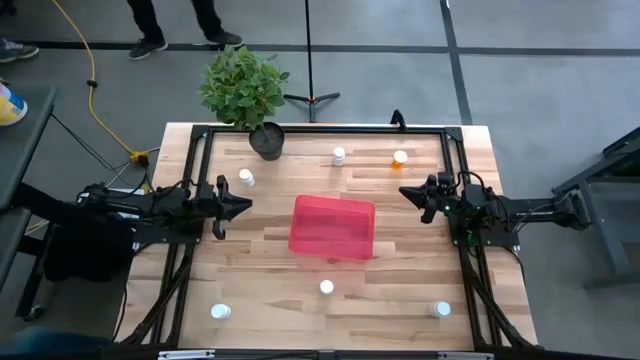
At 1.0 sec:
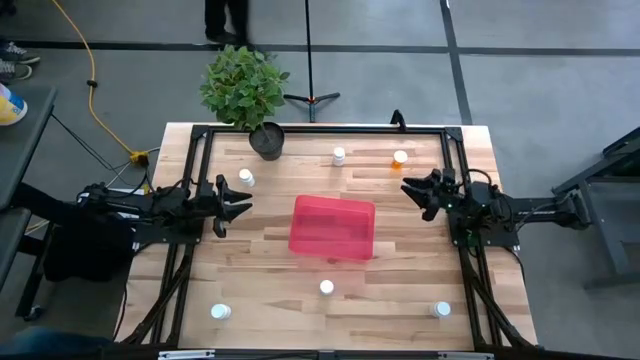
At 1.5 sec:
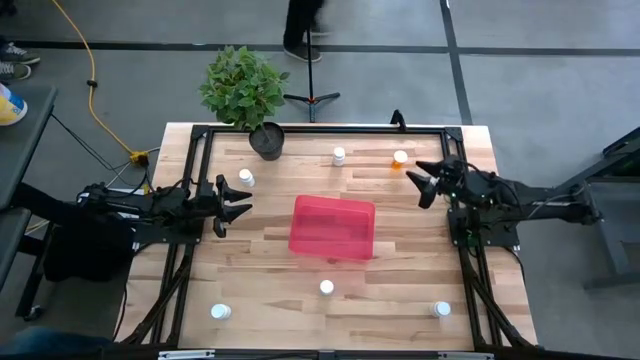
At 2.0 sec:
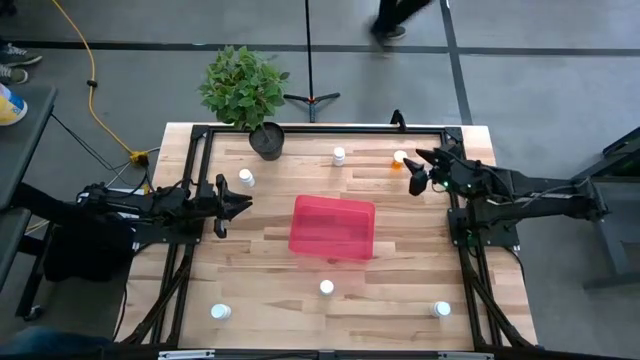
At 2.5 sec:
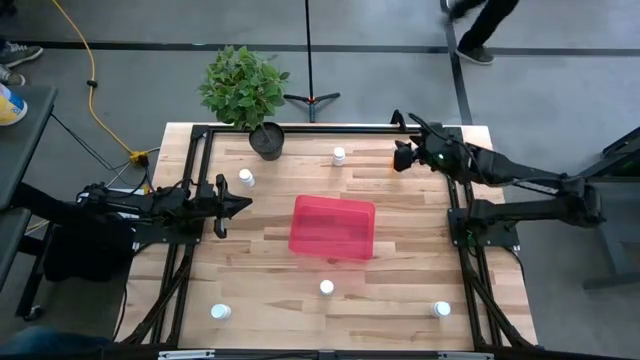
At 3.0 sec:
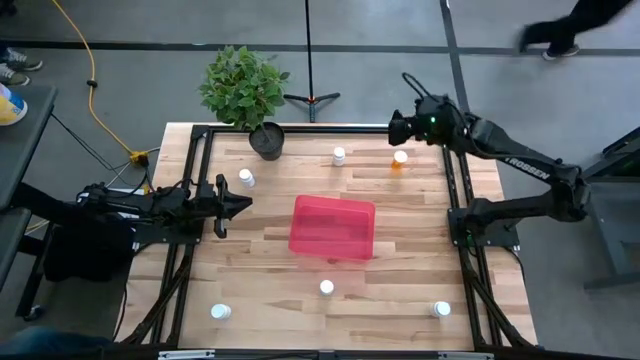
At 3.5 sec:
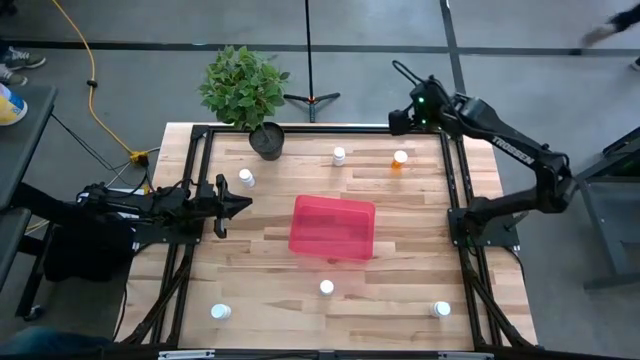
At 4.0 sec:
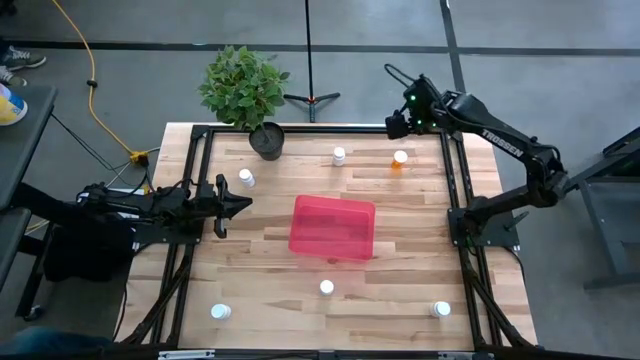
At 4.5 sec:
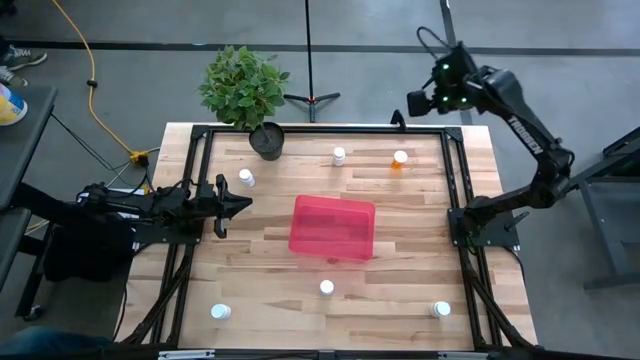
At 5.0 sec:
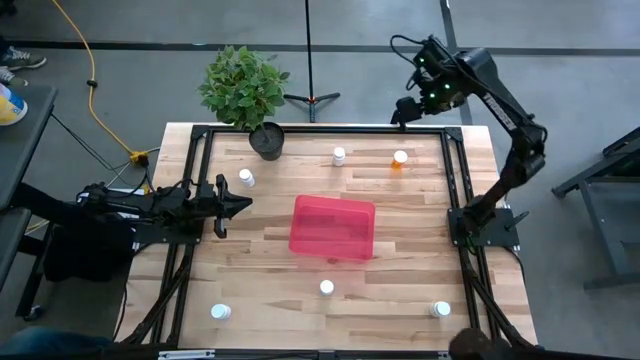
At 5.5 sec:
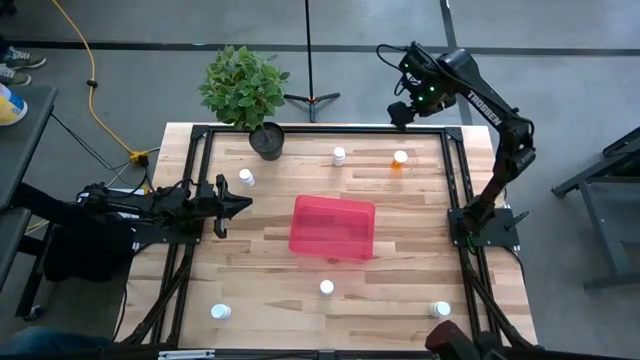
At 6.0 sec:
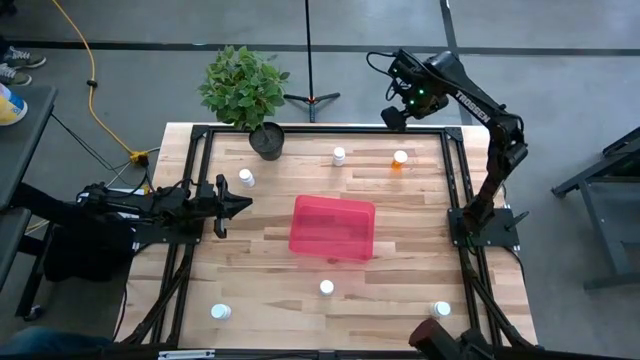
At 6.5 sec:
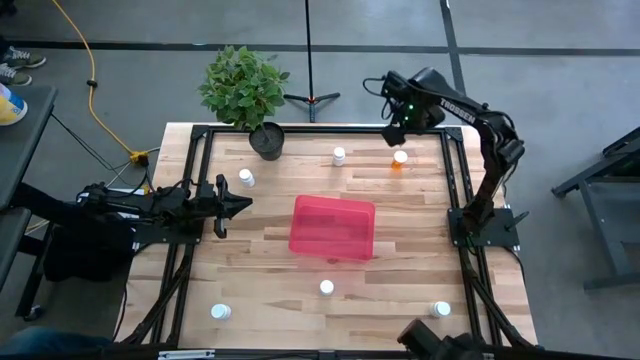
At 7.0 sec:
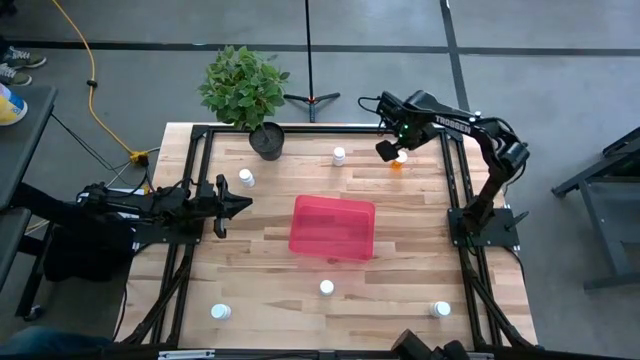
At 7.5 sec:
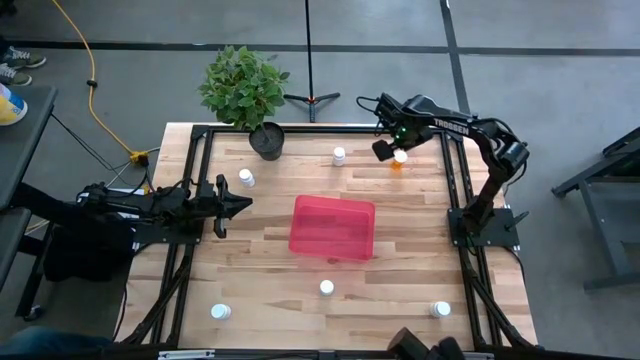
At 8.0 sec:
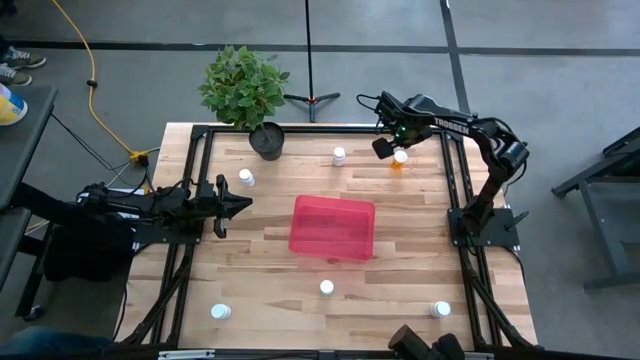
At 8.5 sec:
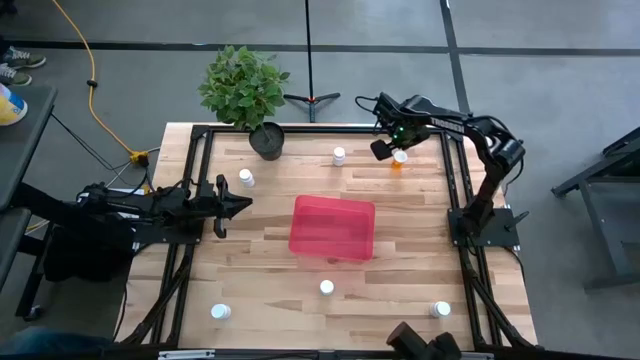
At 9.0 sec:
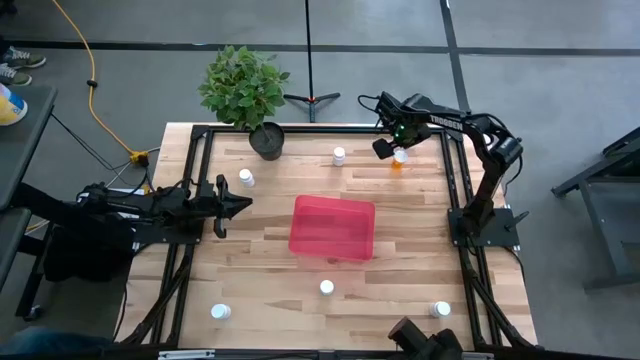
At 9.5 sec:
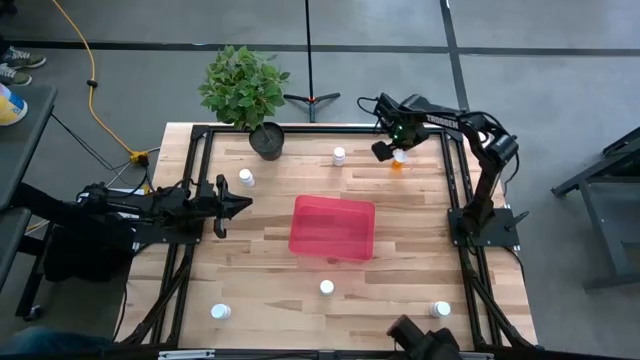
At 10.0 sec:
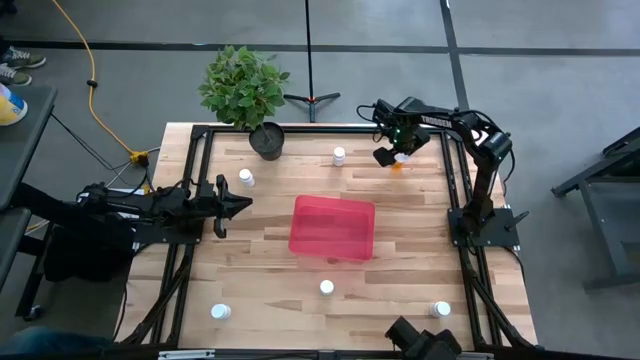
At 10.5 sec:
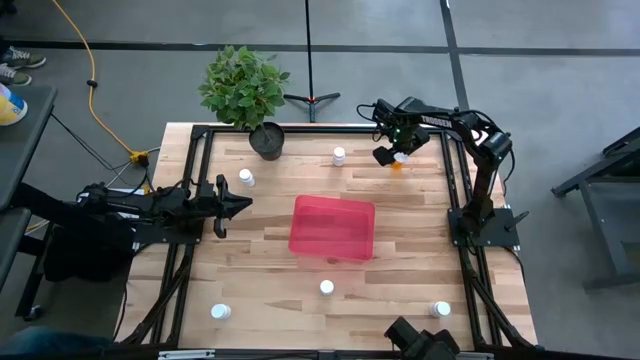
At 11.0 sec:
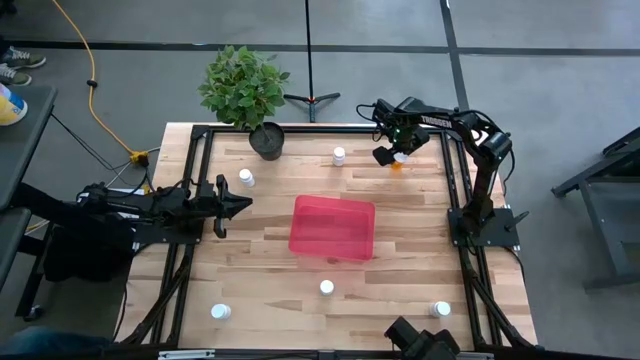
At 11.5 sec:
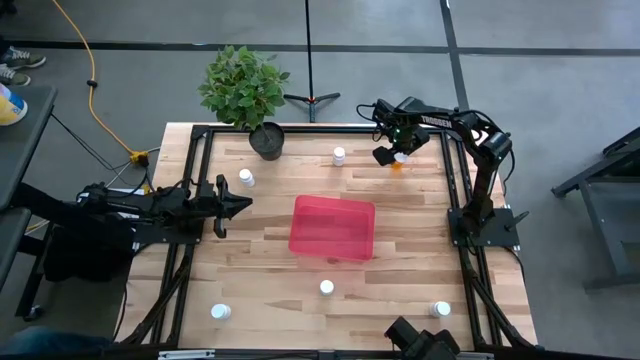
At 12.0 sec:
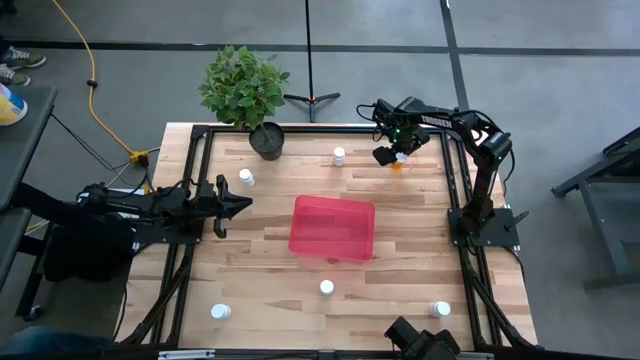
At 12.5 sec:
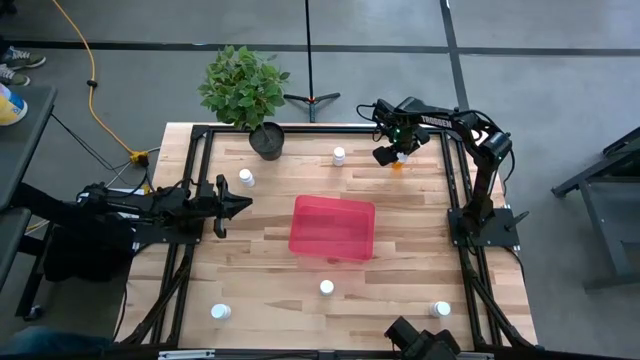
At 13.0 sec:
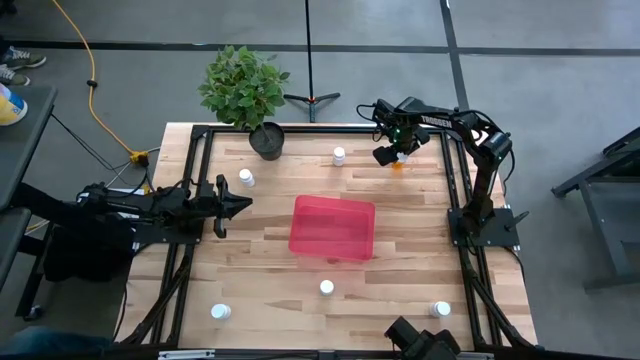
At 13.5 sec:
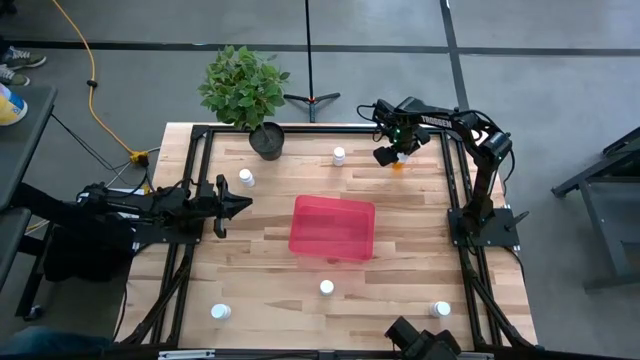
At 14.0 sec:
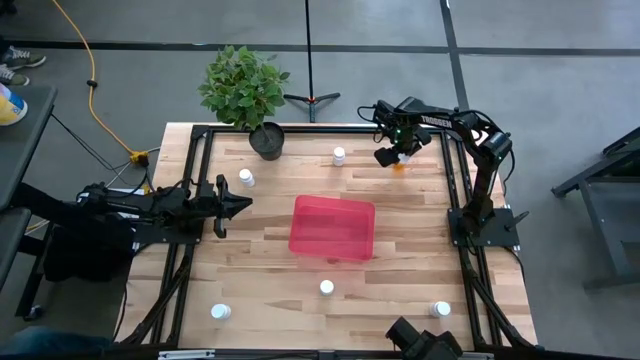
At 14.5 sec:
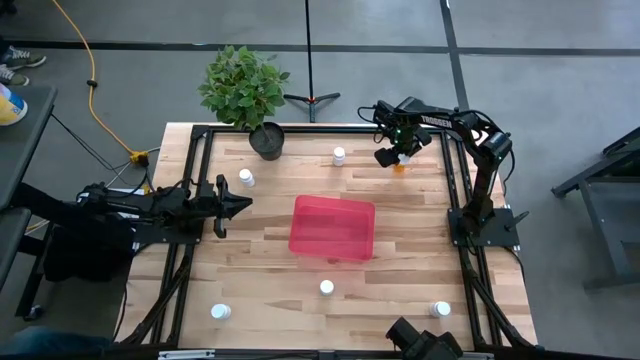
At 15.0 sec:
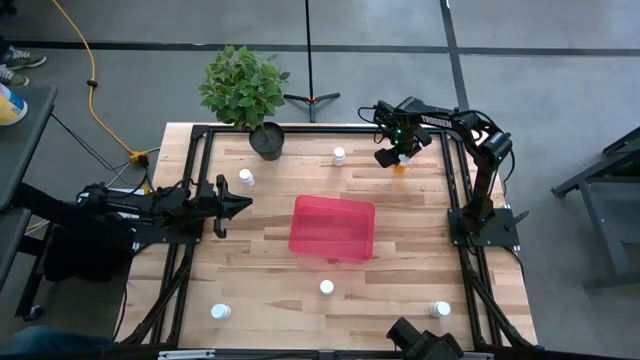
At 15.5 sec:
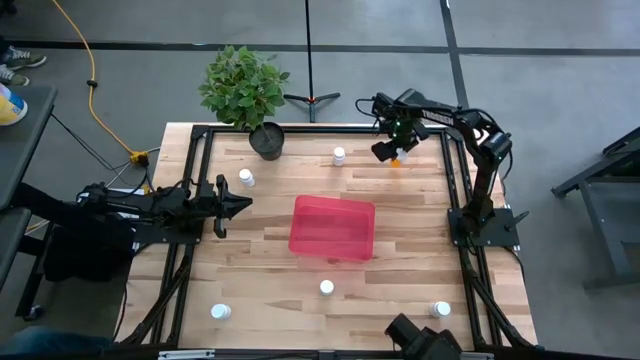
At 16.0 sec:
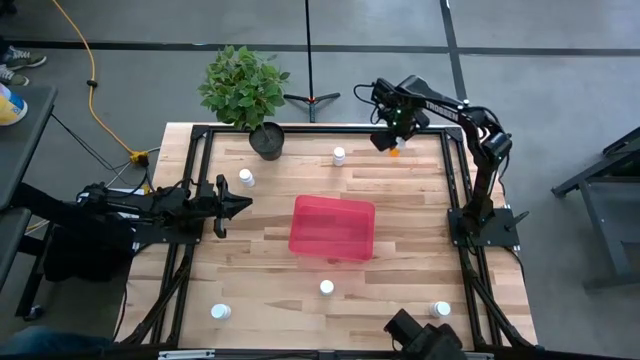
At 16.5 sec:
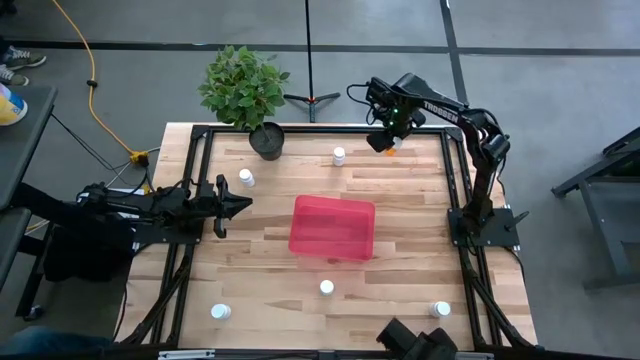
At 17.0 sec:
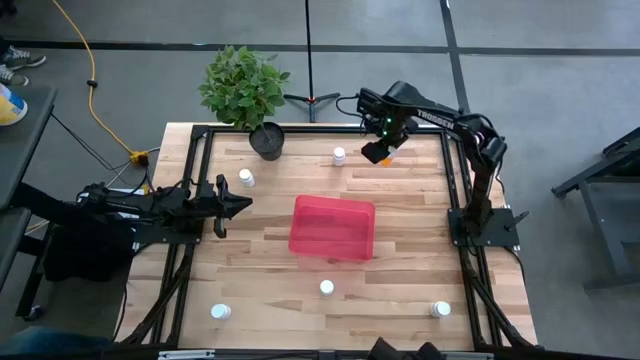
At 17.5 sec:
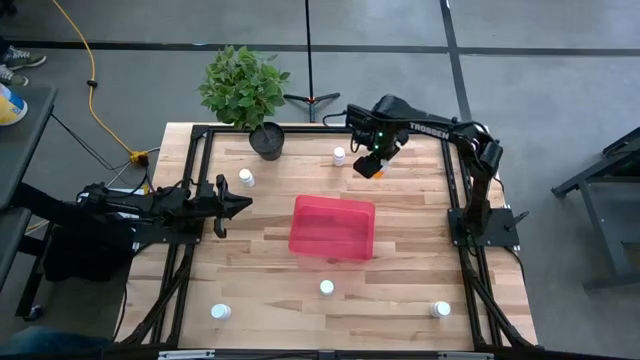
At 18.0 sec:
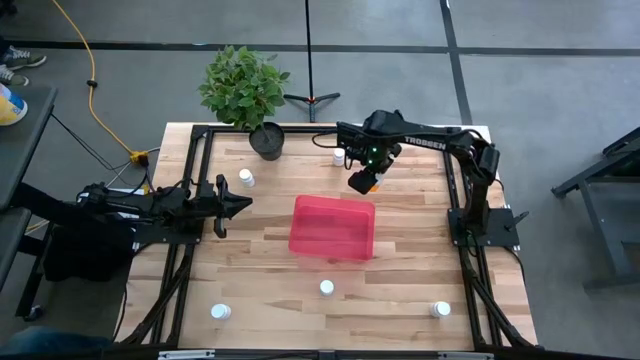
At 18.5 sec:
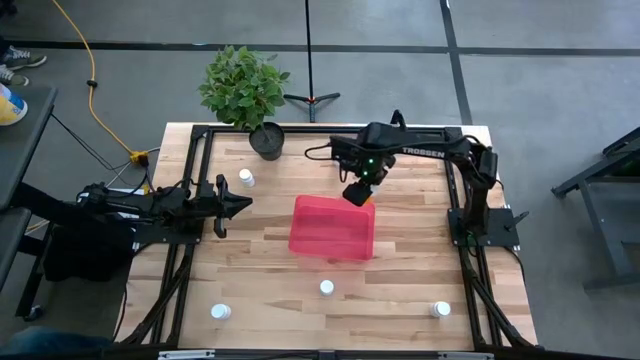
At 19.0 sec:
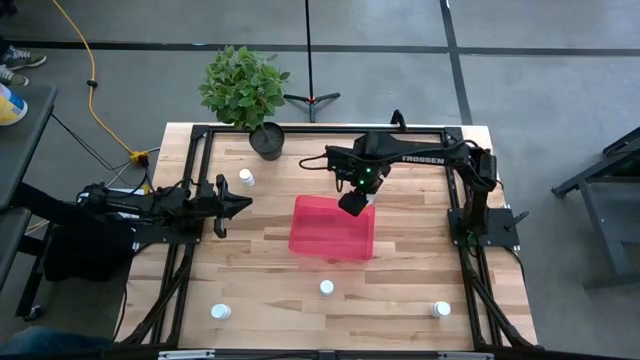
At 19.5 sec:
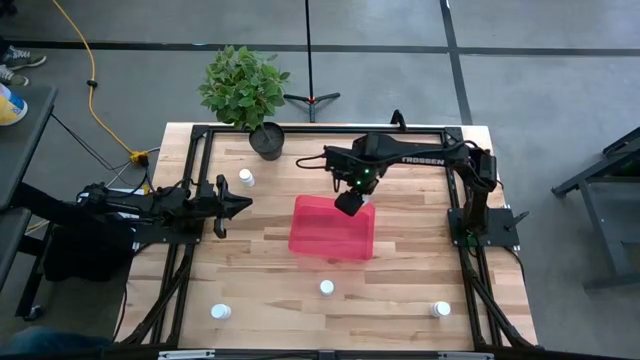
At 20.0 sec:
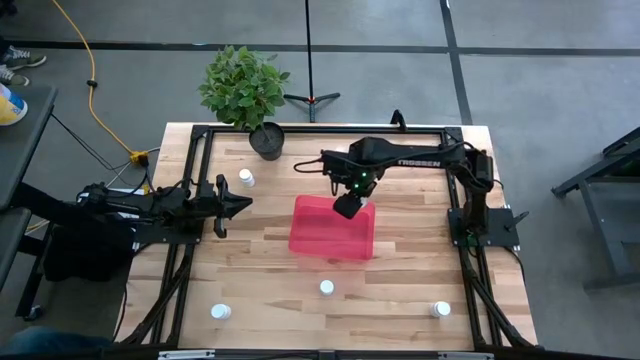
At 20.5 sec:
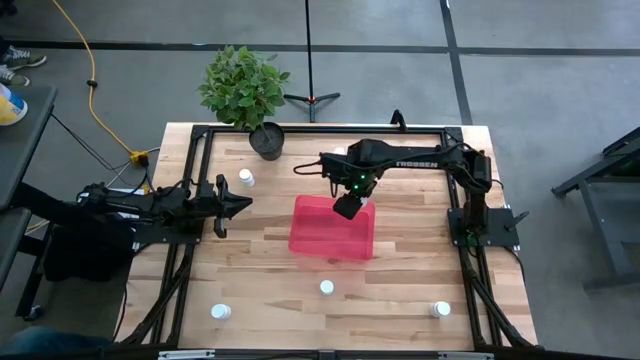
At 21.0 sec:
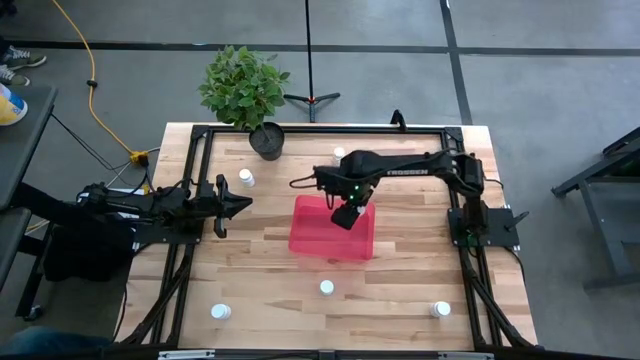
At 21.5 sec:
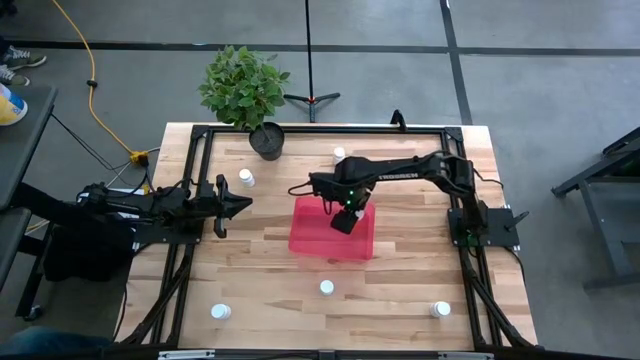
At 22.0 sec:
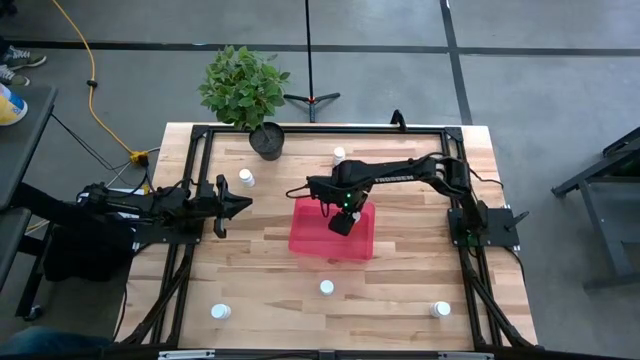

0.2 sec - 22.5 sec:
Task: Pick and place pill bottles into a basket
Put the orange medicine bottle into the bin
